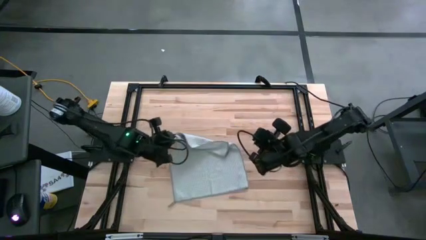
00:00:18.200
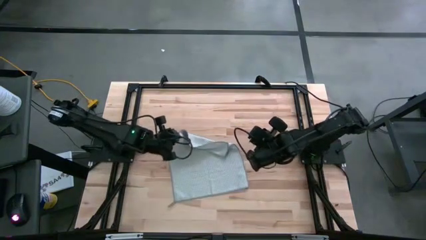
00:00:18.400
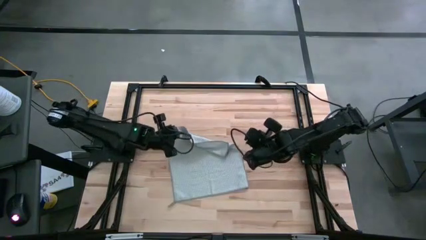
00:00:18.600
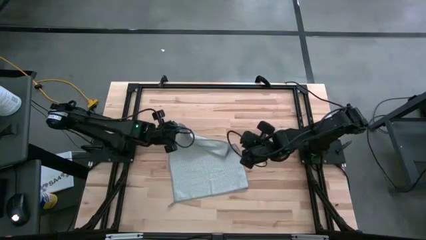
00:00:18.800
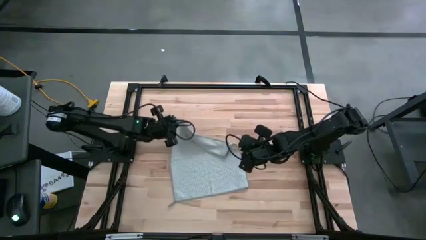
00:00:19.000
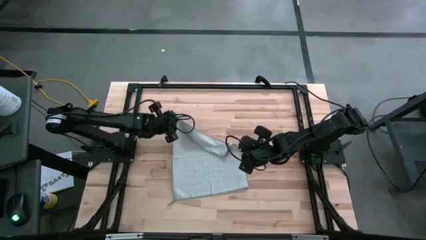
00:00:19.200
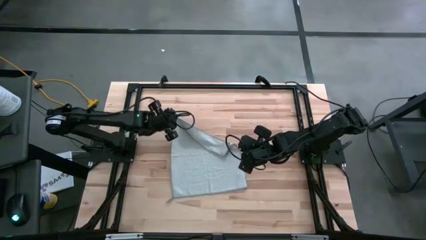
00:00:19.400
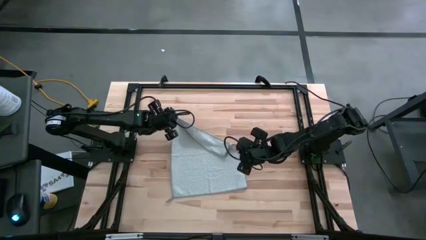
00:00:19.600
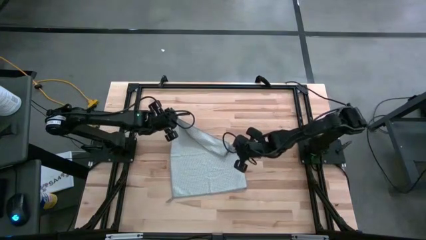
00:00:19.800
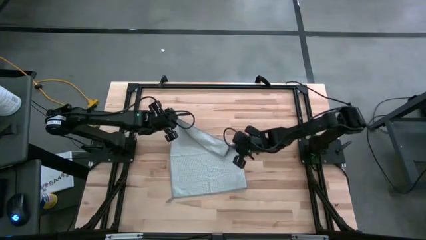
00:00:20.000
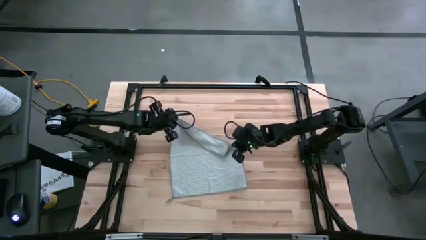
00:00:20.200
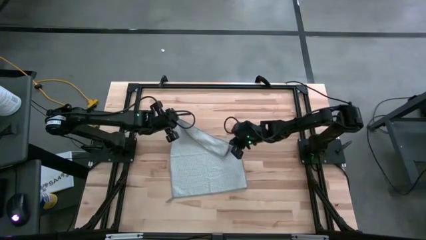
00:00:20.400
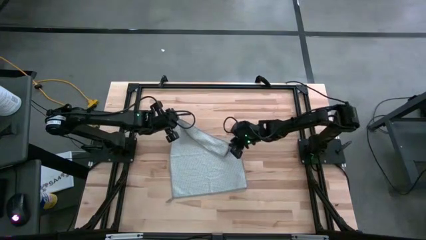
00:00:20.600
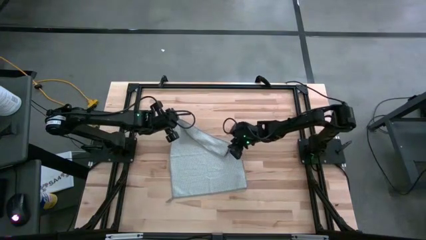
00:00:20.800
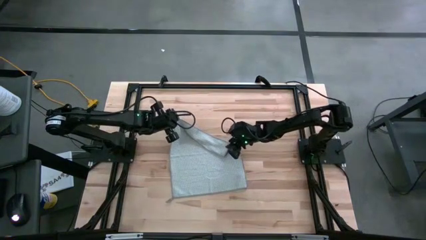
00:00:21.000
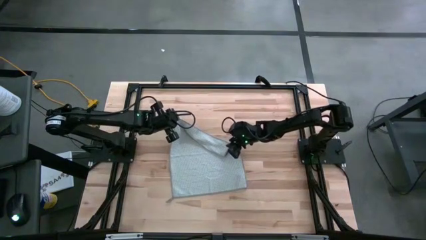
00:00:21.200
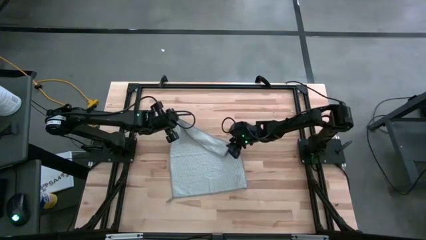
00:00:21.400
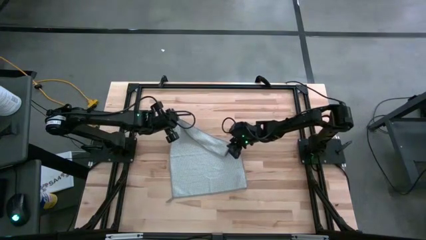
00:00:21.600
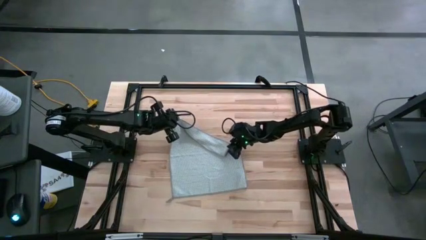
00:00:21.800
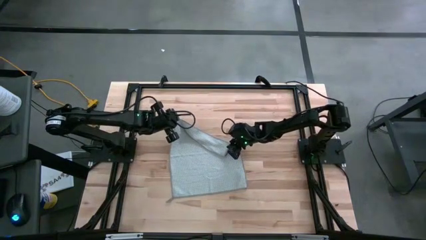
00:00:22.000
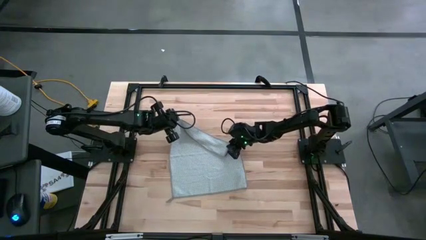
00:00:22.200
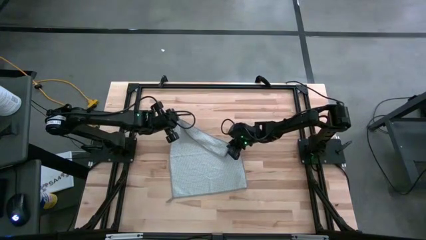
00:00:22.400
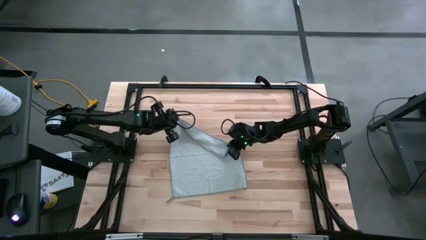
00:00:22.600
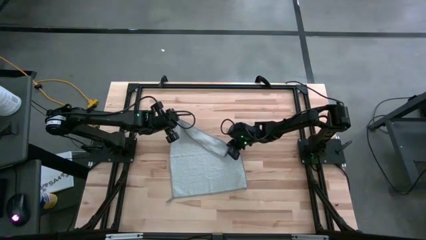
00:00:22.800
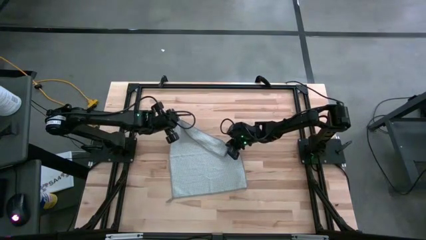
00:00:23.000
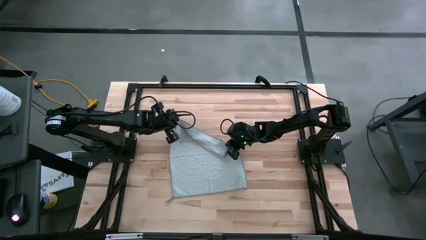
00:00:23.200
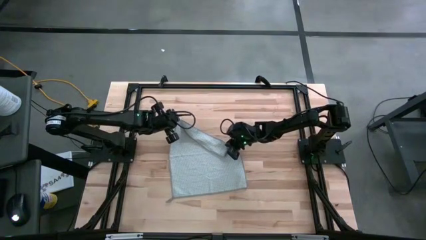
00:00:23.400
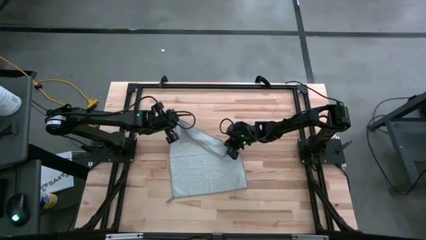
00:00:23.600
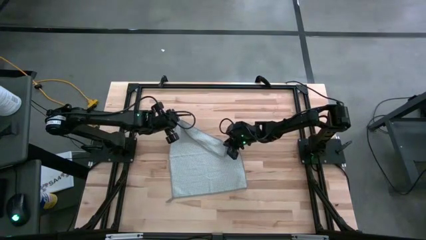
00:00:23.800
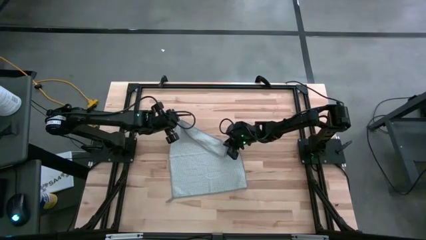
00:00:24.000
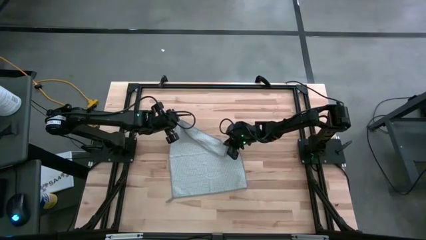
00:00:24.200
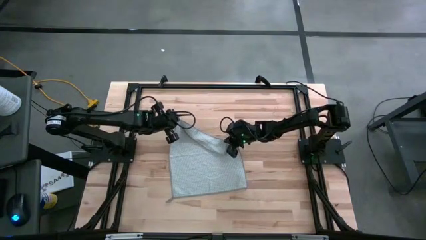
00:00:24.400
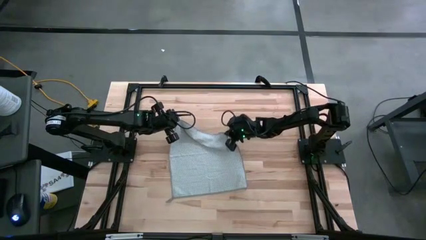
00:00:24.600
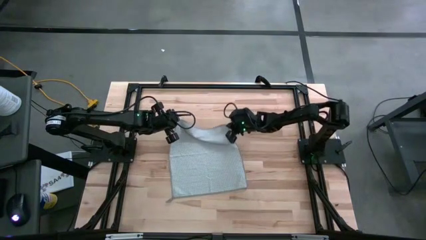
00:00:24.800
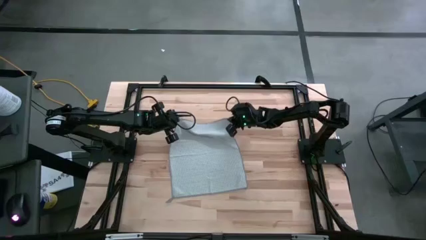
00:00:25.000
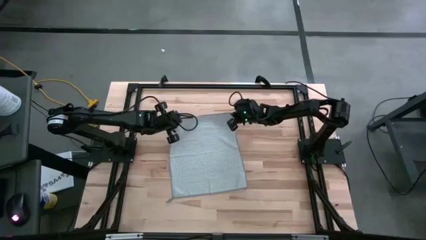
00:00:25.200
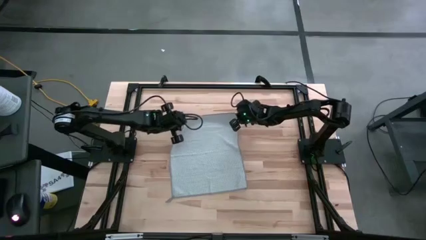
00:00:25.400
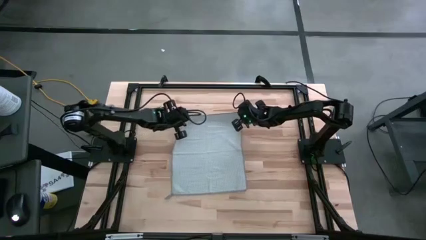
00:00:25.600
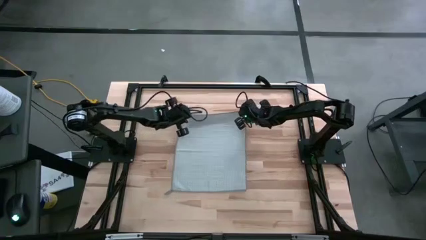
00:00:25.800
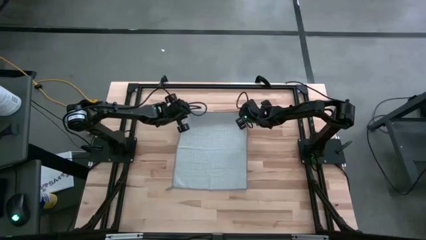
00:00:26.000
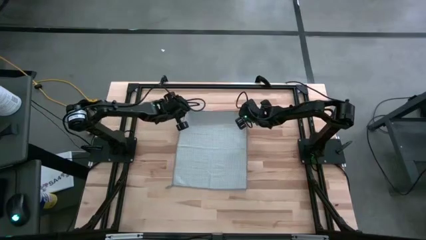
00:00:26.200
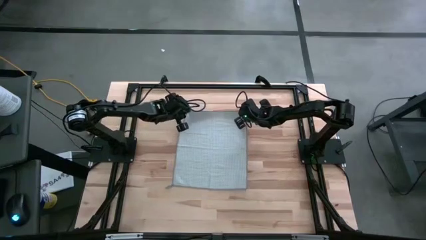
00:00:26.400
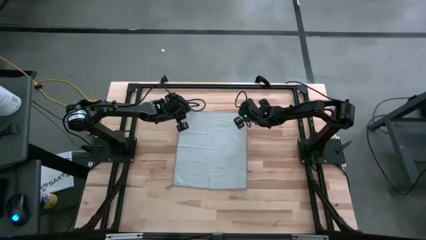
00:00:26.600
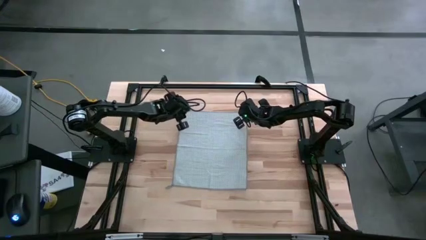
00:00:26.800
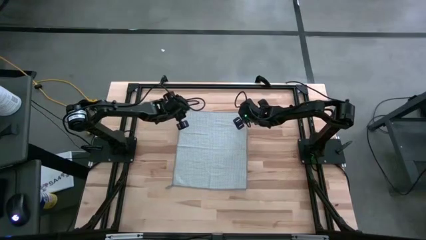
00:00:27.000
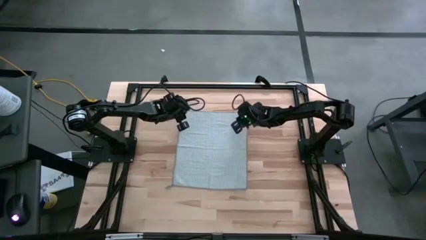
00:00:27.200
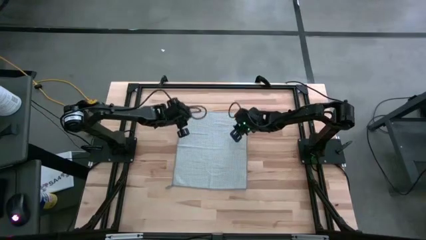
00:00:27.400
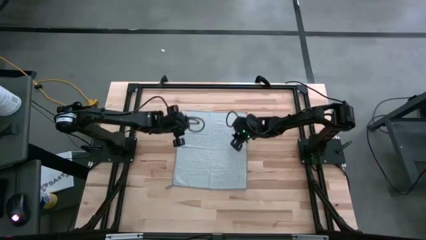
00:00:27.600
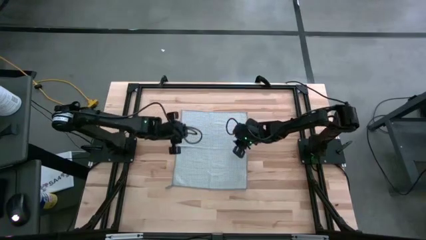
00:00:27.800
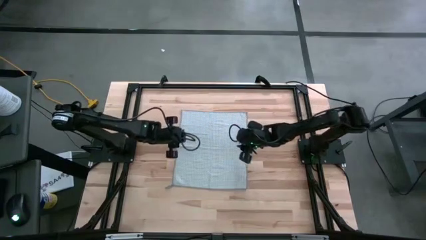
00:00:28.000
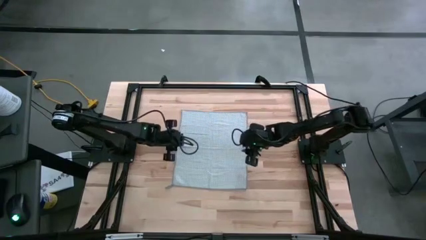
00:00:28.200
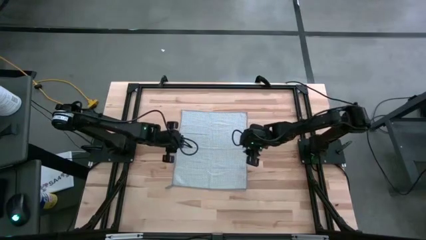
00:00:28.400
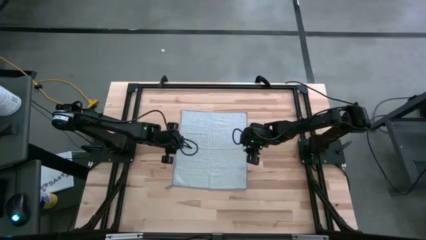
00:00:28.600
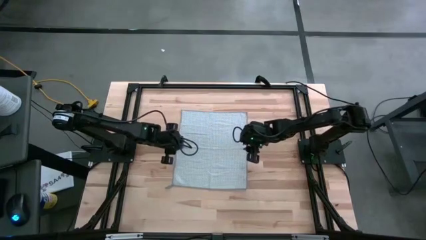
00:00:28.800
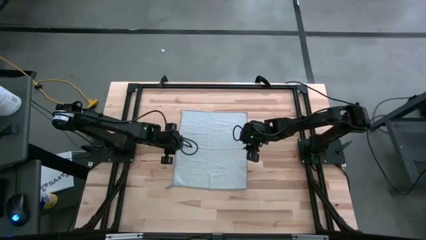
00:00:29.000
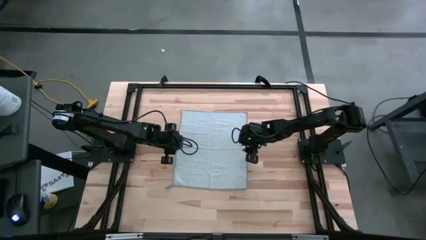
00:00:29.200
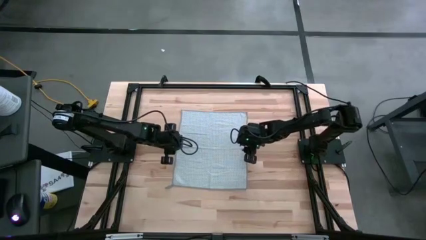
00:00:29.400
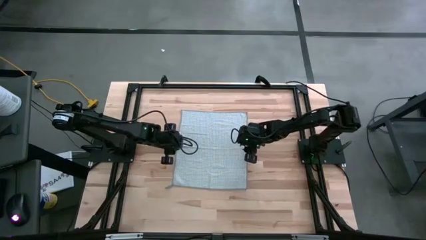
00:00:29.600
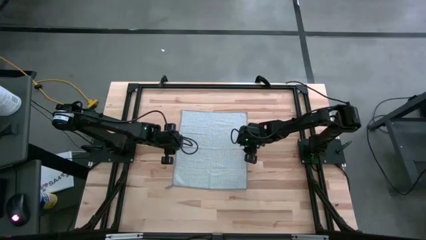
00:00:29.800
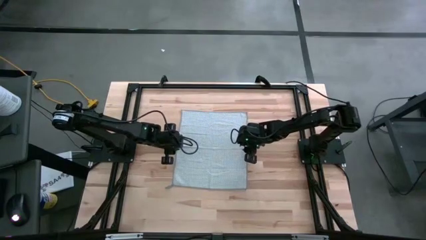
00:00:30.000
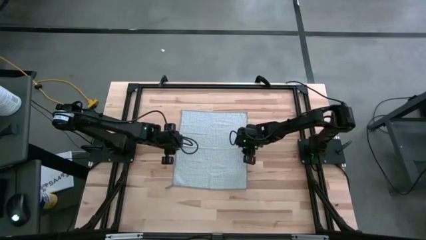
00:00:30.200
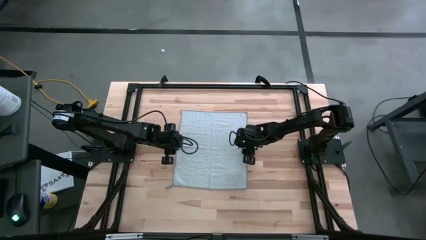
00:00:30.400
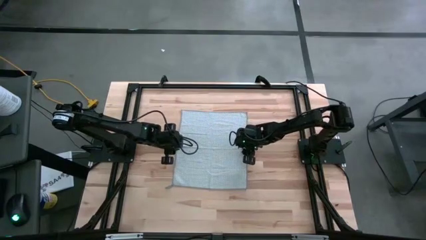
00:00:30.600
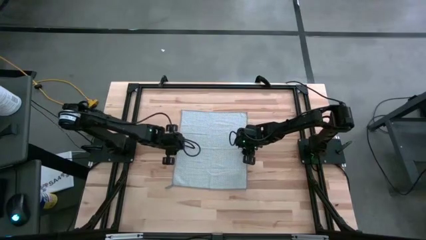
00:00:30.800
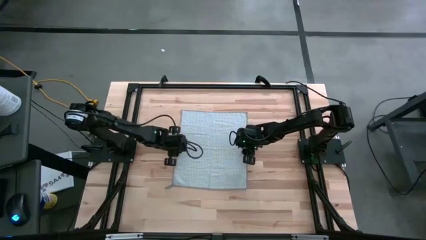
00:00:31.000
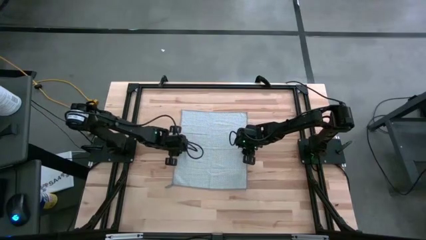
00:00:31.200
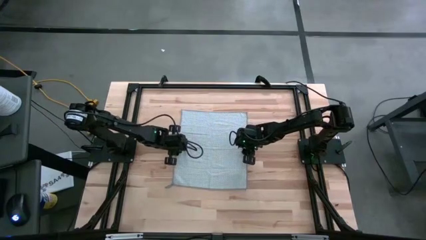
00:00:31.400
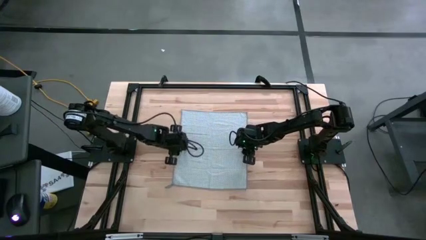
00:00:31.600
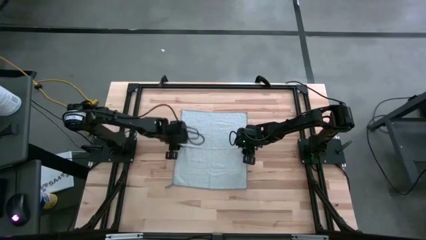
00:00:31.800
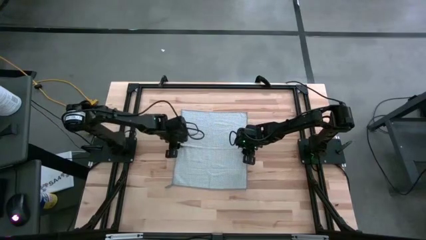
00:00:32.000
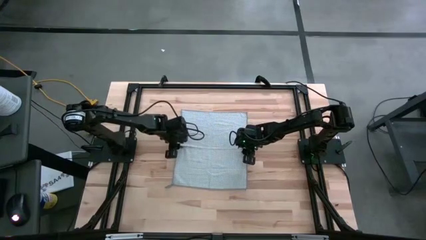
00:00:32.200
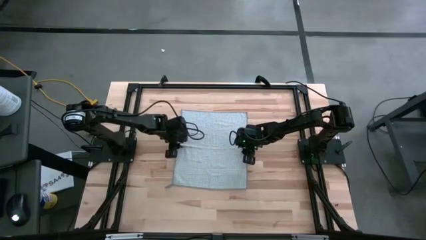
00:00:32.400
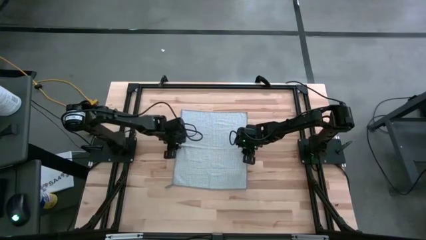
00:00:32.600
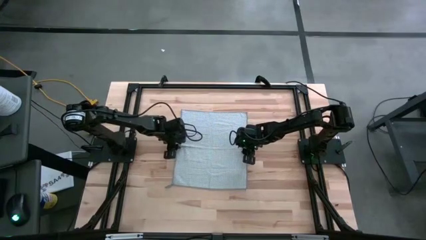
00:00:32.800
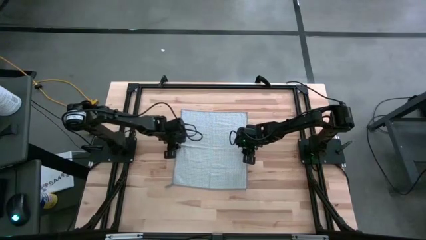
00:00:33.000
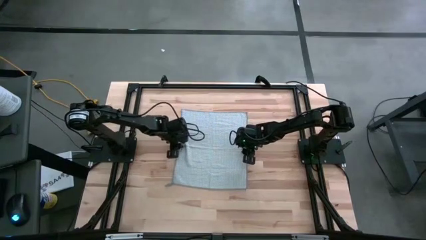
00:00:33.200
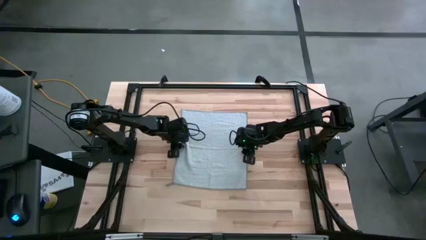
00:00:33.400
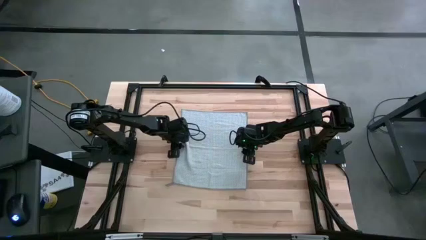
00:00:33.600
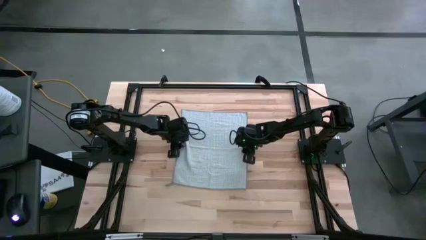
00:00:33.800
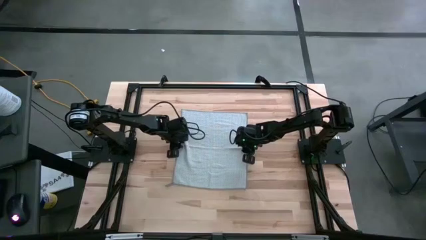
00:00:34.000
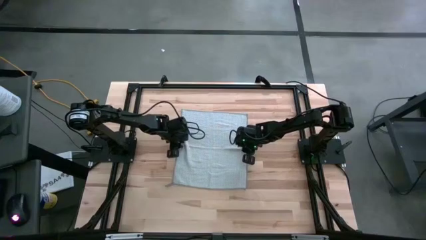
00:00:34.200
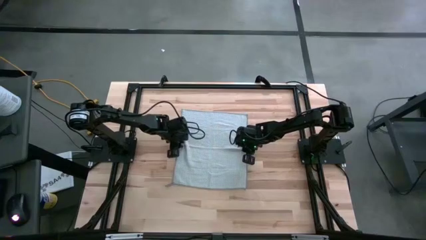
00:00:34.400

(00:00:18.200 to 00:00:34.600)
Task: Fold microfiber towels
Fold the gray towel
